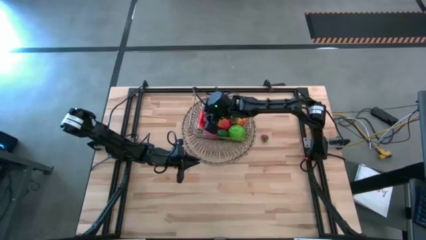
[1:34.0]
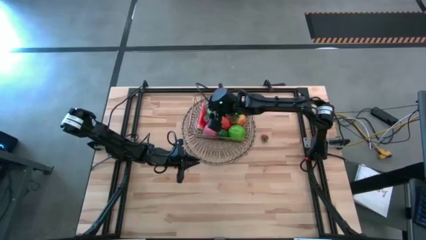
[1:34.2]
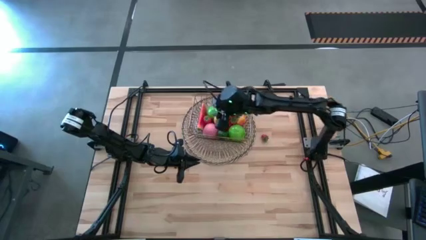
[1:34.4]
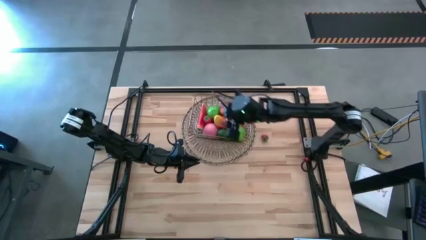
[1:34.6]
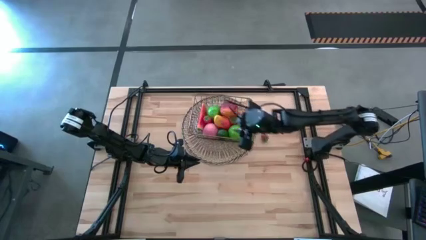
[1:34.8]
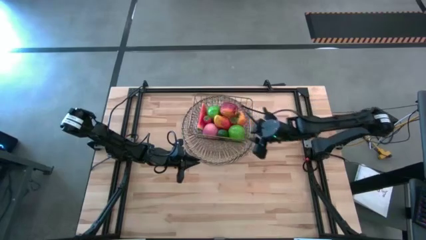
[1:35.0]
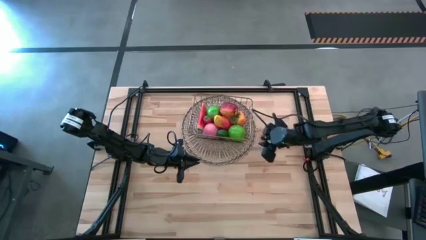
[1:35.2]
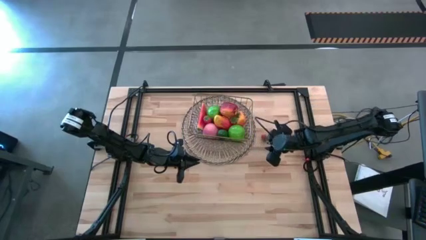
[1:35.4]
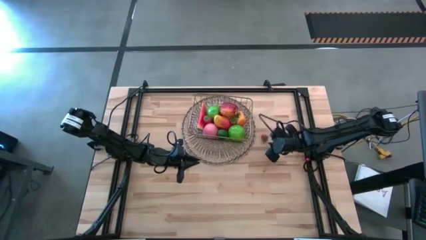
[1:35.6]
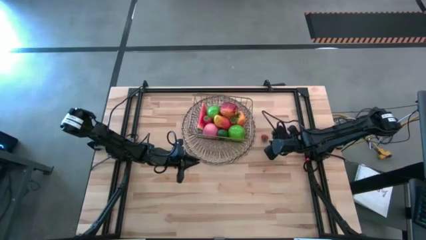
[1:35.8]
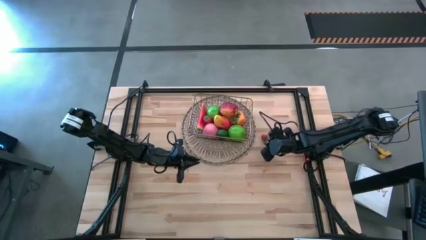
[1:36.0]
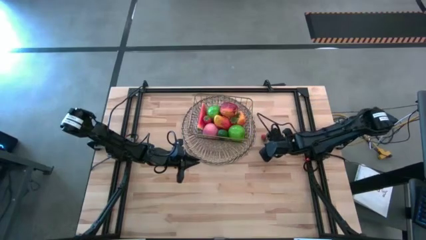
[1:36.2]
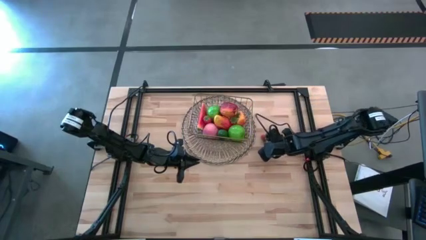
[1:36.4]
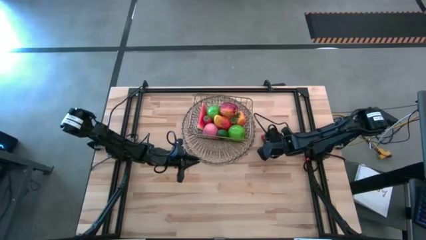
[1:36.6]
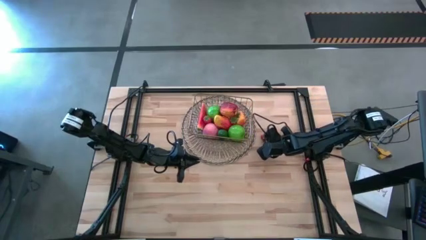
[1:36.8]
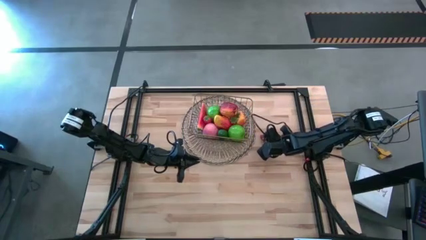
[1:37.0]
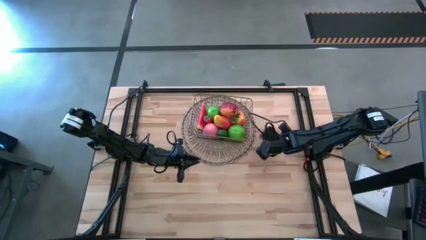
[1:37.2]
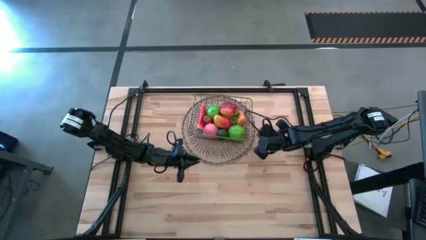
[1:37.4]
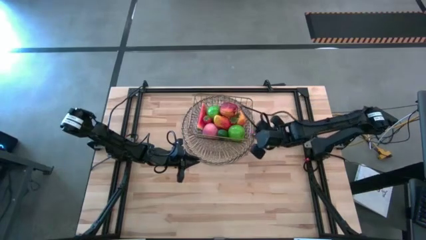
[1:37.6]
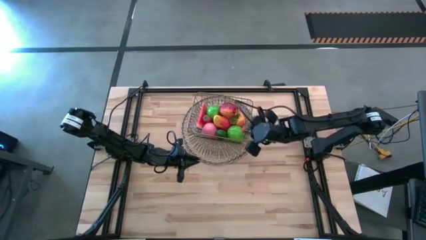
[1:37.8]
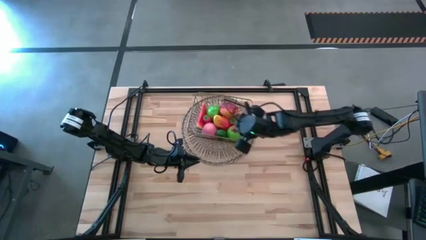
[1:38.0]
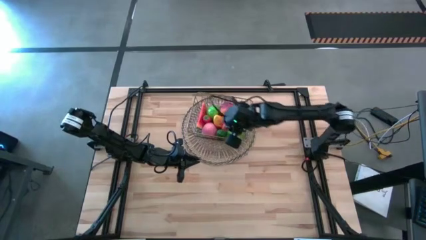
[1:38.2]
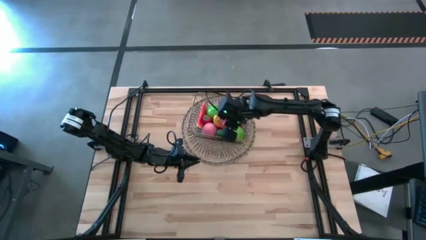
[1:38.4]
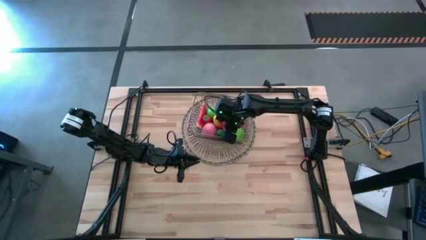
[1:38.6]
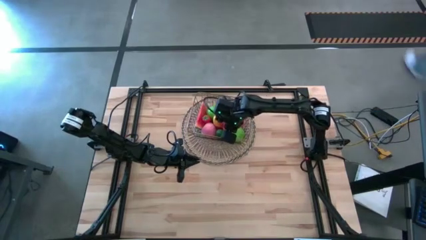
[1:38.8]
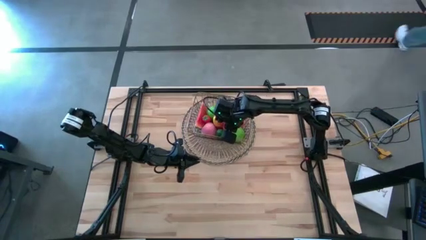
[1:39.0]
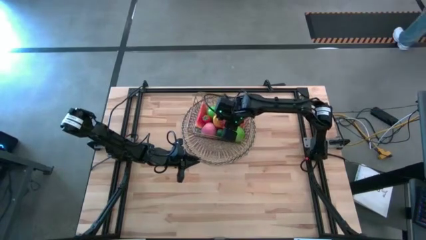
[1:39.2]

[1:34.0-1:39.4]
Task: Build produce basket
Put the red strawberry into the gold wire basket

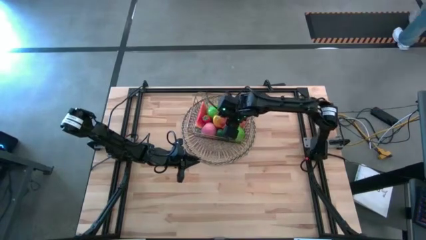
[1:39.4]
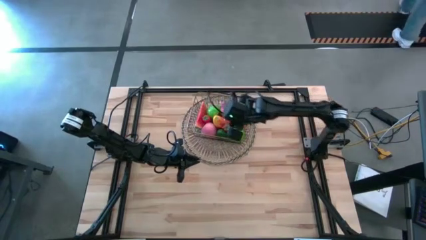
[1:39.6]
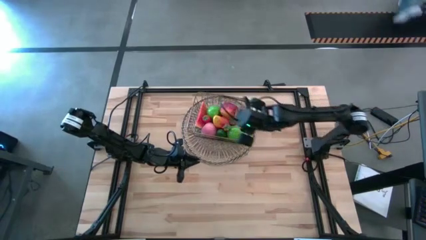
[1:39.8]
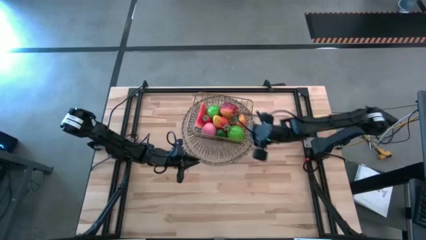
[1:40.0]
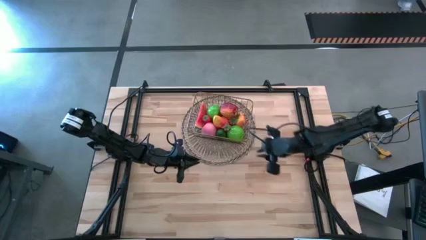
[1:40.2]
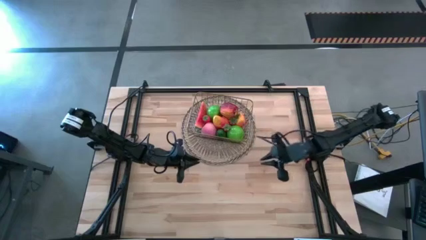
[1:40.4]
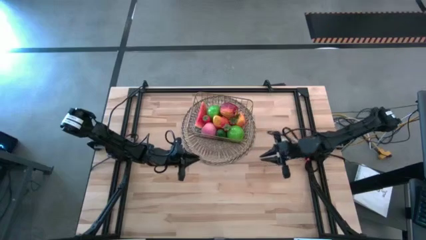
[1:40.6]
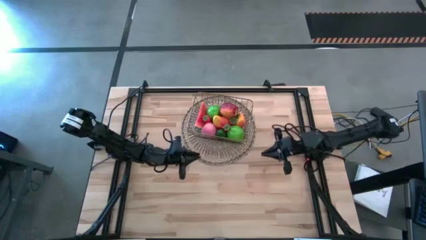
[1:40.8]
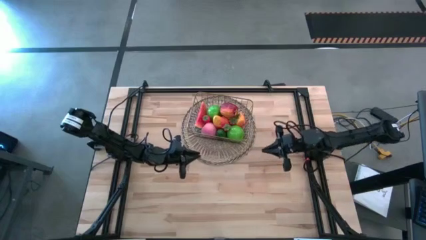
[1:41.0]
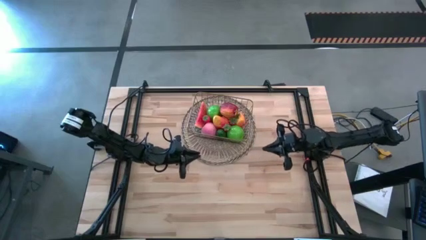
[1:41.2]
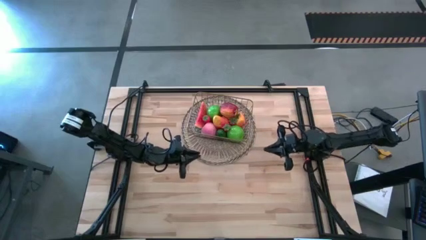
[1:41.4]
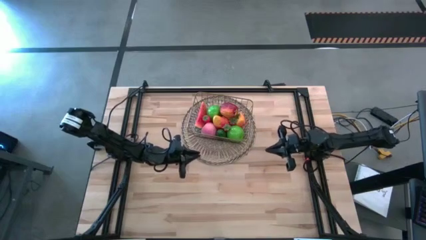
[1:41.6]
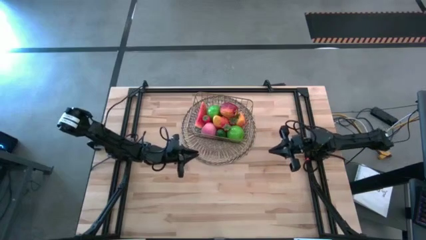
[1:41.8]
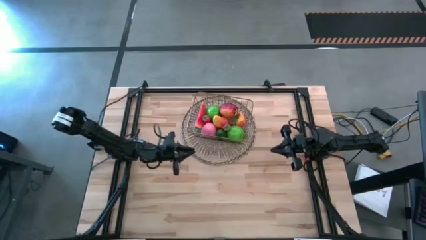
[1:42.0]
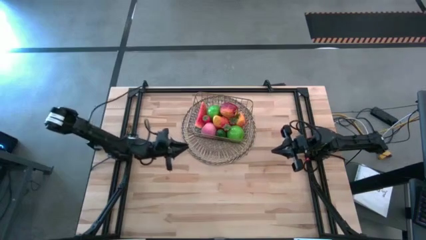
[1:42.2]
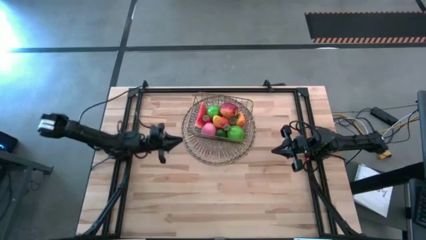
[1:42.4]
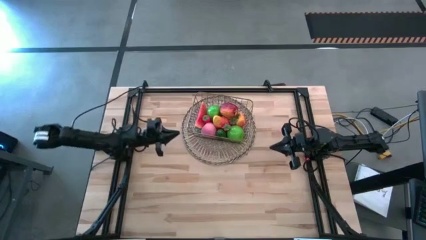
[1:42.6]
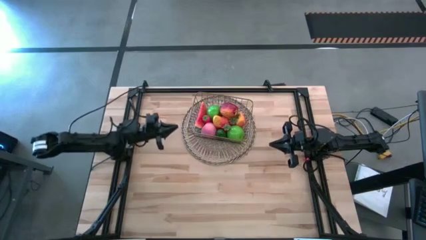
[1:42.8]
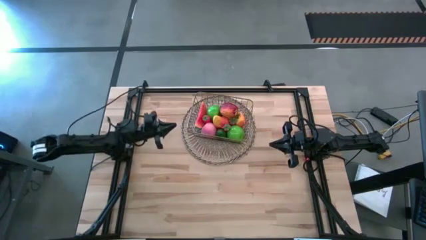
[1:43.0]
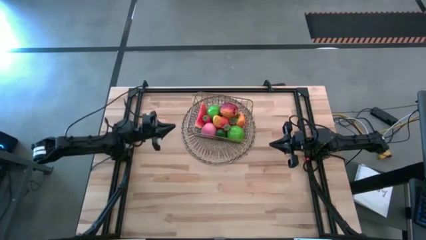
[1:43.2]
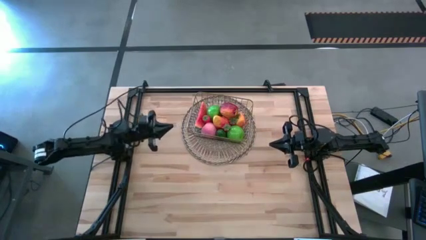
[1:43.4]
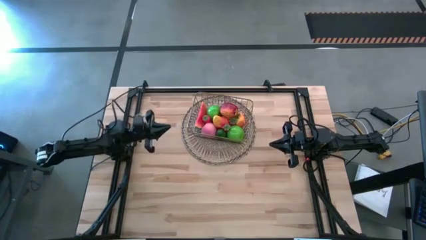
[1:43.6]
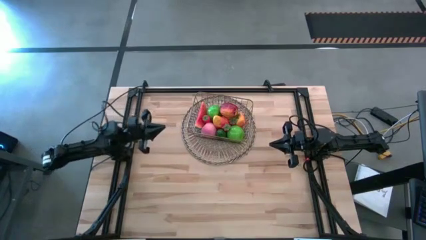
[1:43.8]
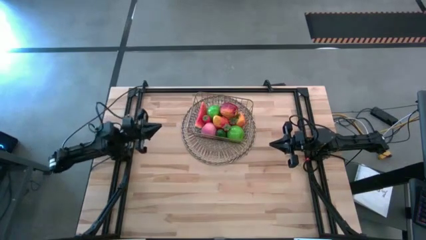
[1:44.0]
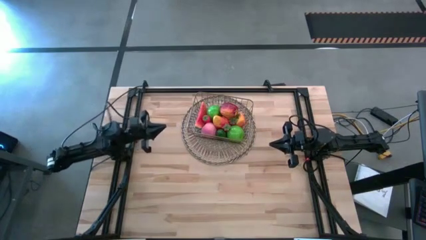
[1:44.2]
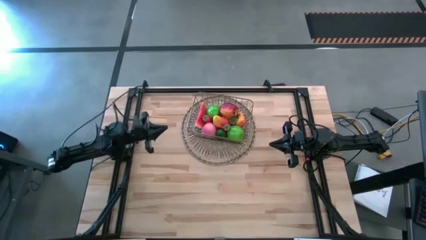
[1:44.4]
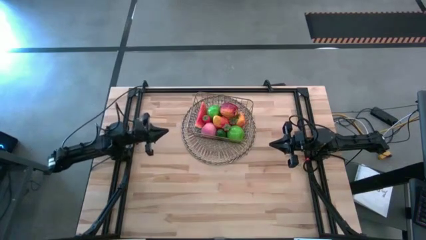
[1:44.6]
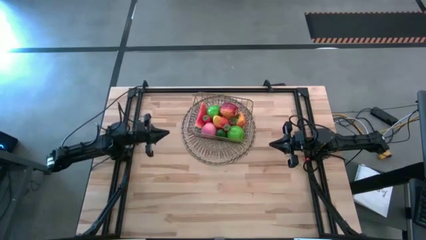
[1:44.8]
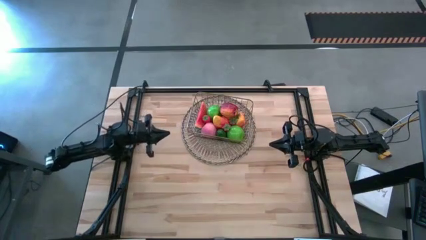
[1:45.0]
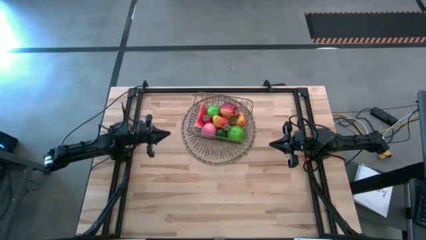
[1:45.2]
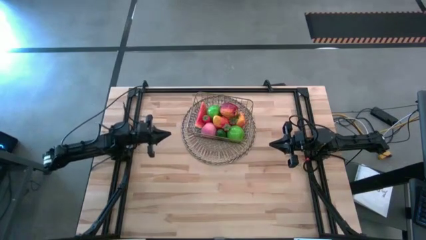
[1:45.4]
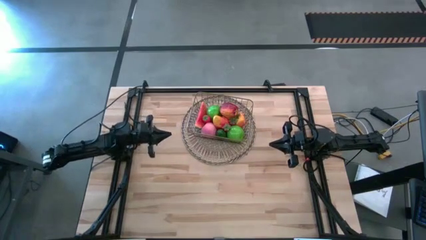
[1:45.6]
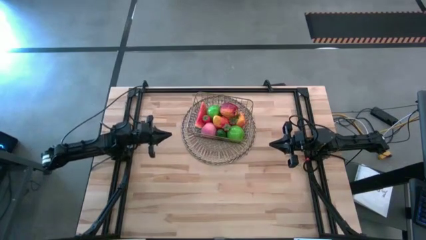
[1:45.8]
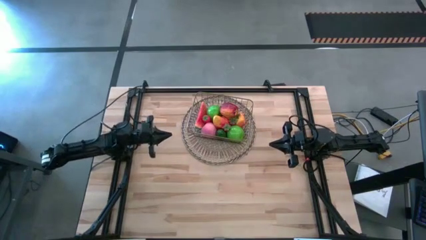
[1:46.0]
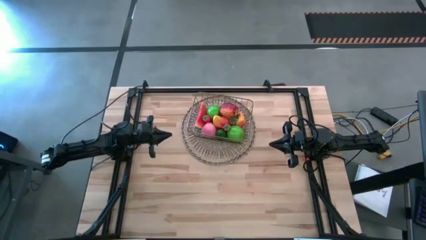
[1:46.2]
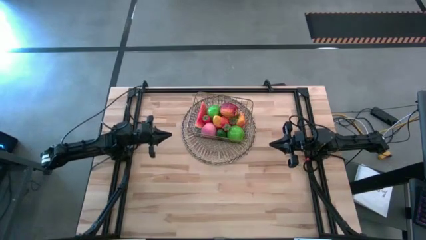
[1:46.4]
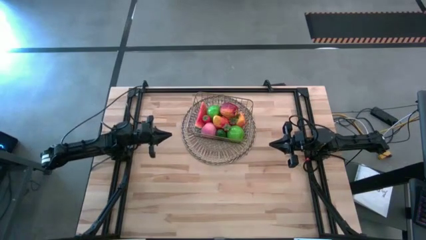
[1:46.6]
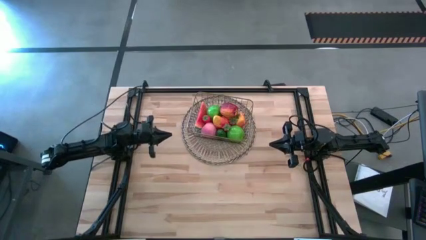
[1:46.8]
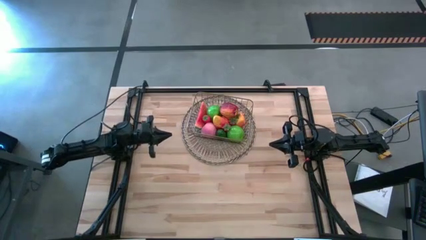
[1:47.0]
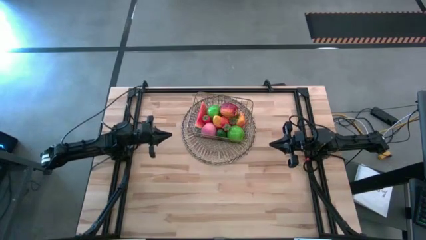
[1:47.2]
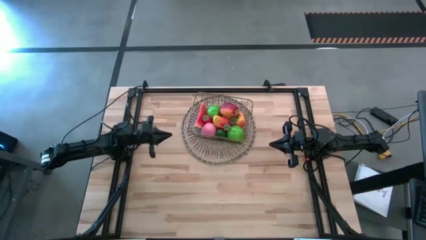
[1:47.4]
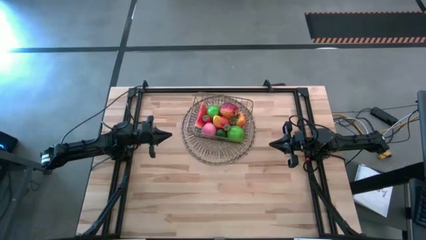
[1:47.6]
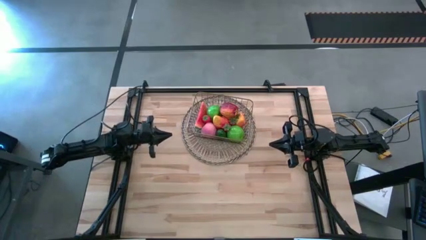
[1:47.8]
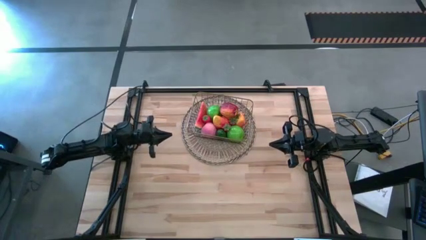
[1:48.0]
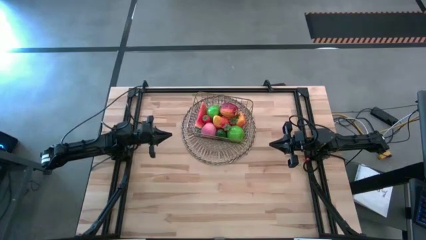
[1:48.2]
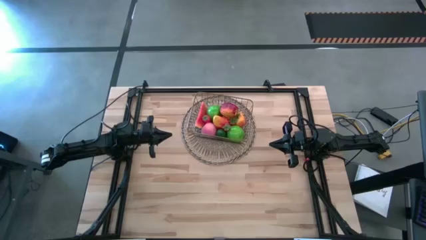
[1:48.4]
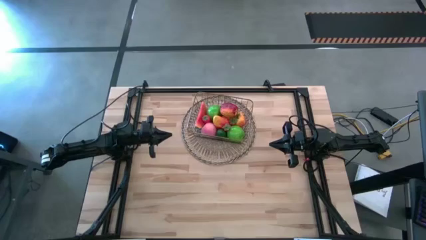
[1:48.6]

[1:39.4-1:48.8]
Return to Home Position

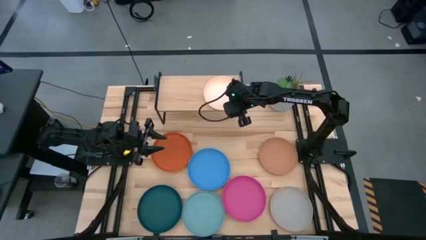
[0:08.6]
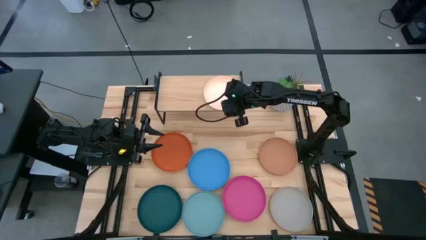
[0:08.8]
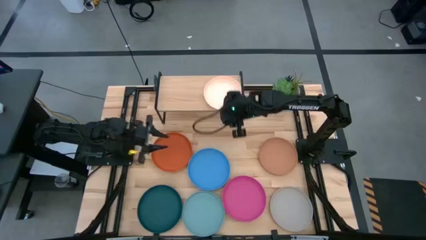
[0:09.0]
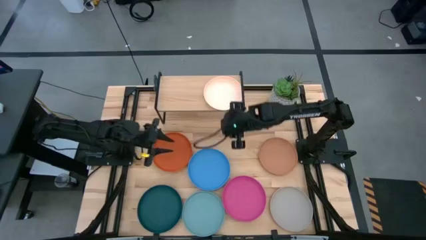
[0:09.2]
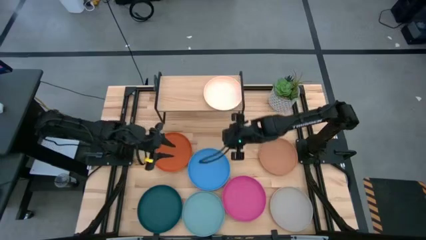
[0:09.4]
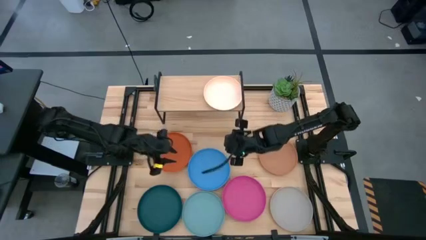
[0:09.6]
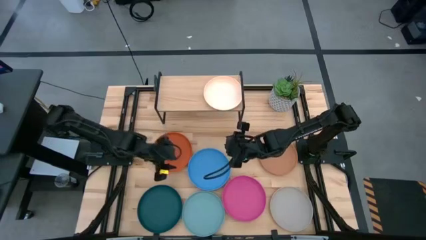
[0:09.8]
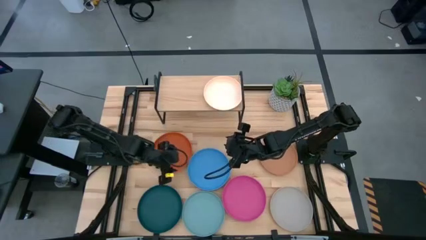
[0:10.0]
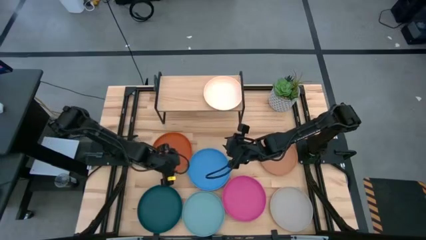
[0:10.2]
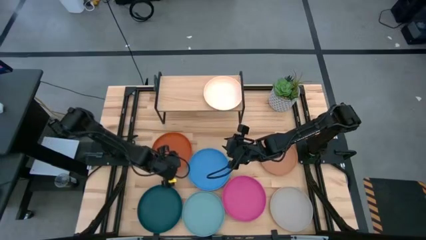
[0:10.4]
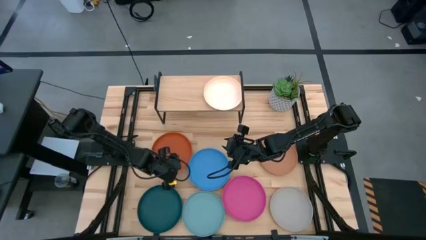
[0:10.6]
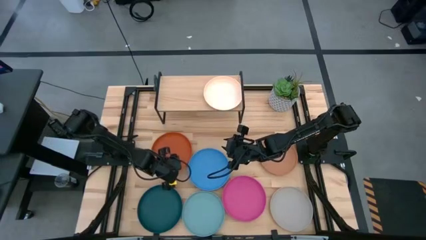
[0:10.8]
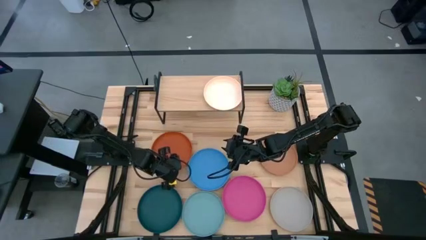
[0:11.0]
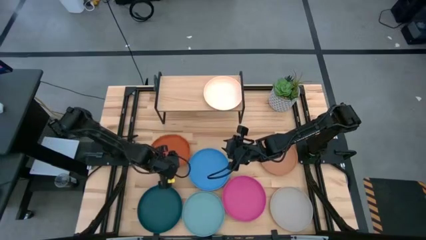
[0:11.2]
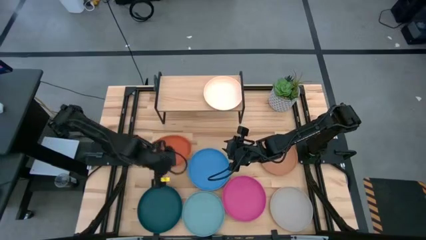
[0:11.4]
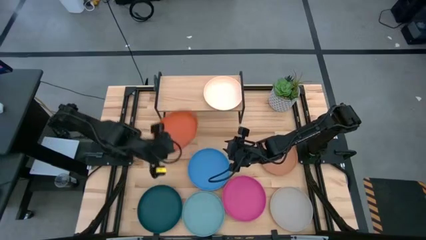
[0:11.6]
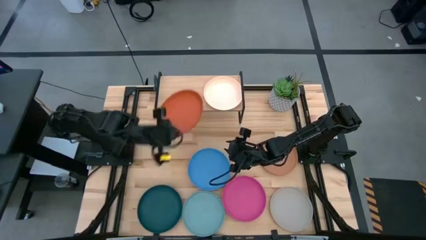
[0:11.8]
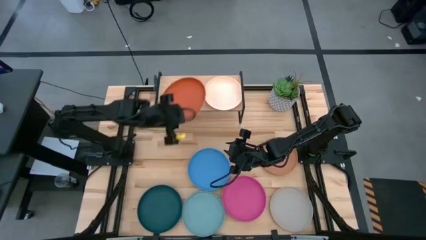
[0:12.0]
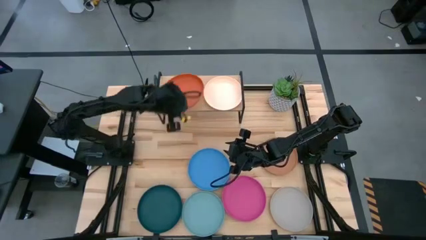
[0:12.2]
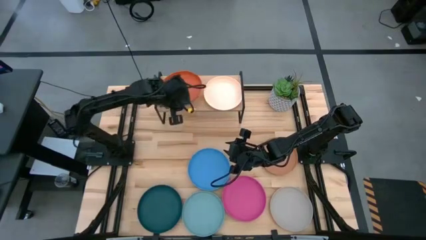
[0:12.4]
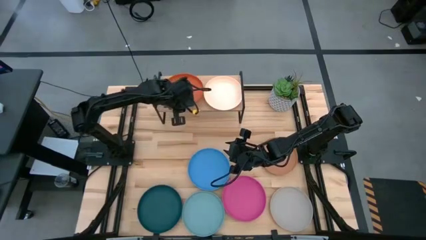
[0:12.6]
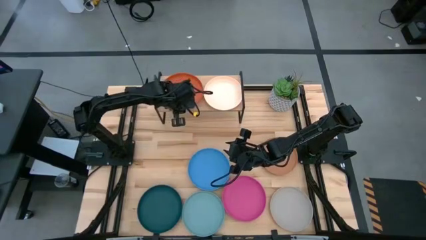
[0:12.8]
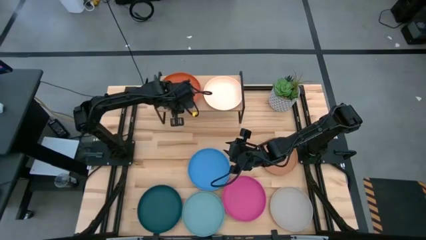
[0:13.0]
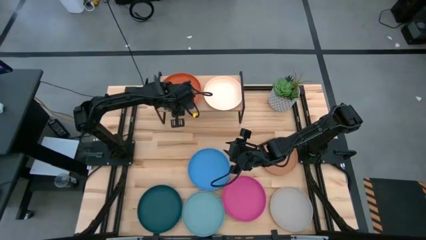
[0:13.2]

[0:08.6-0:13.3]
Task: Place and stack plates onto a shelf
Put the orange plate on the shelf
